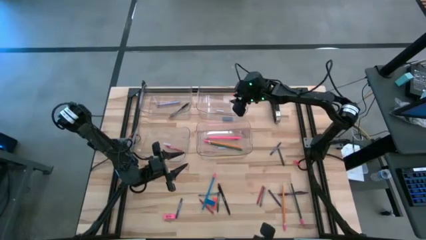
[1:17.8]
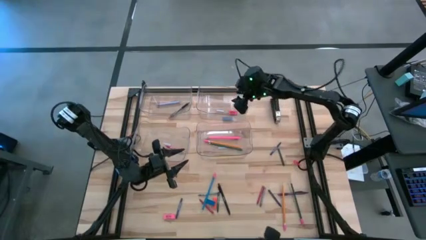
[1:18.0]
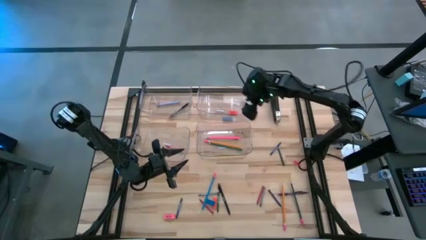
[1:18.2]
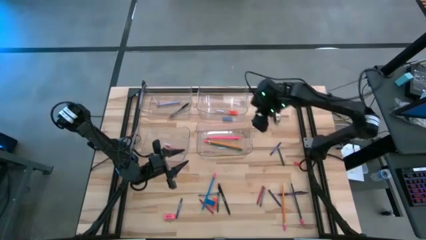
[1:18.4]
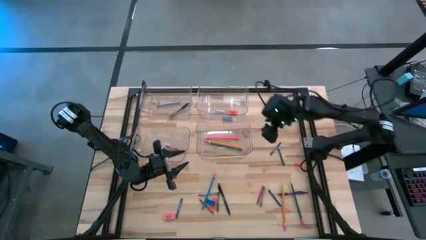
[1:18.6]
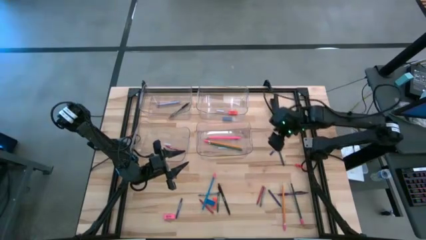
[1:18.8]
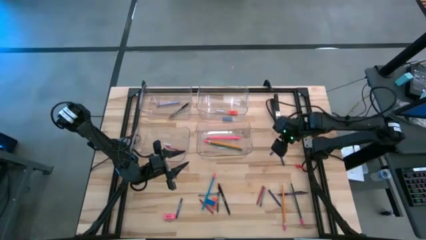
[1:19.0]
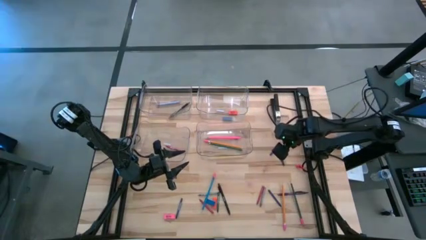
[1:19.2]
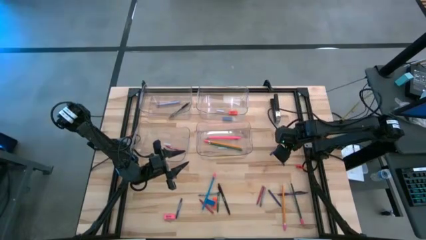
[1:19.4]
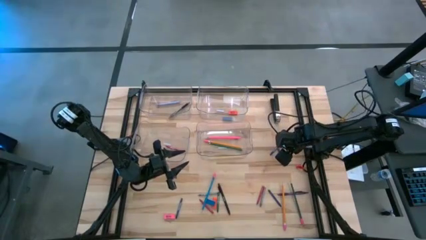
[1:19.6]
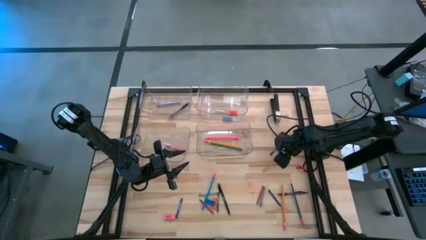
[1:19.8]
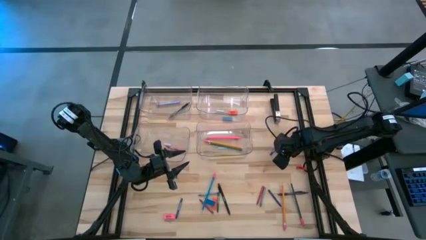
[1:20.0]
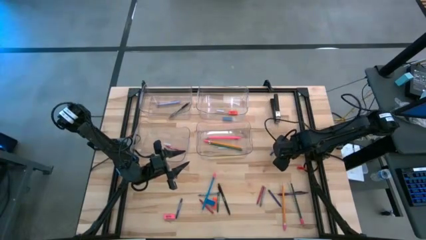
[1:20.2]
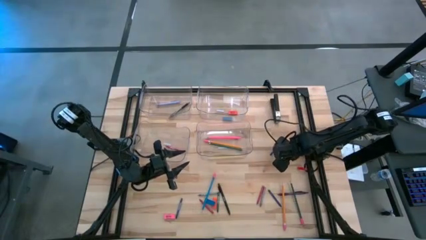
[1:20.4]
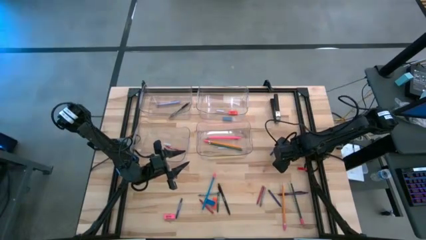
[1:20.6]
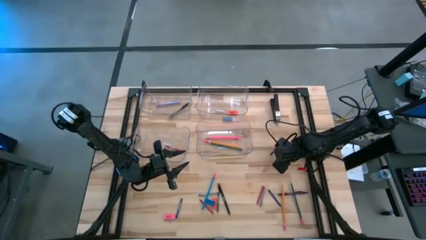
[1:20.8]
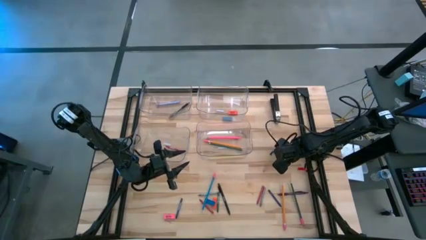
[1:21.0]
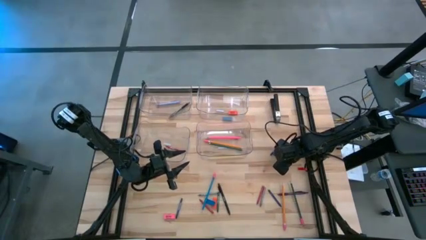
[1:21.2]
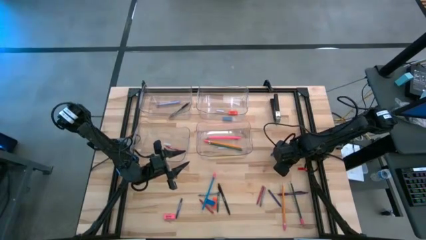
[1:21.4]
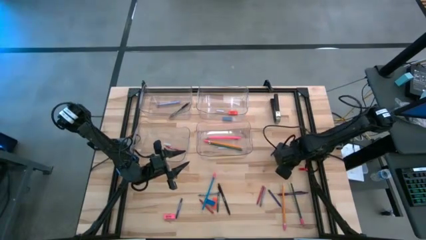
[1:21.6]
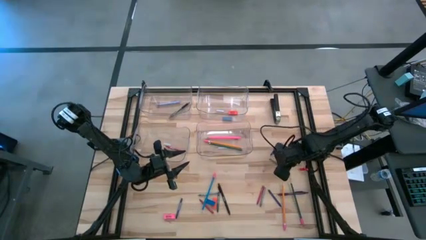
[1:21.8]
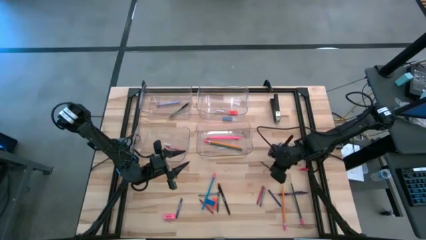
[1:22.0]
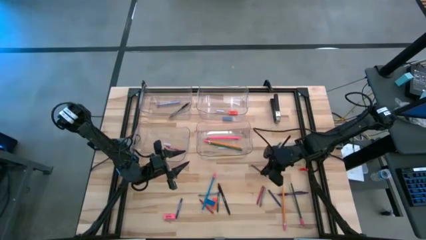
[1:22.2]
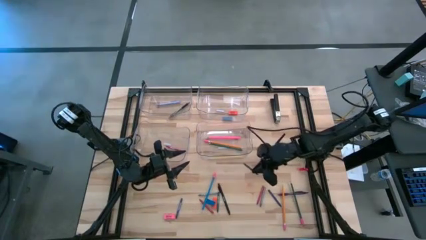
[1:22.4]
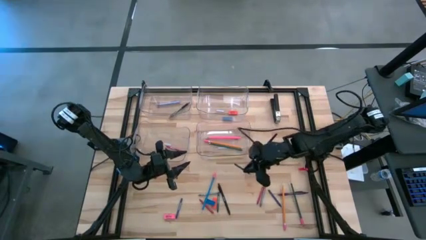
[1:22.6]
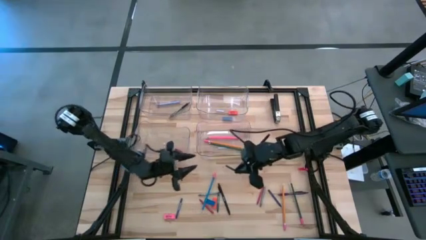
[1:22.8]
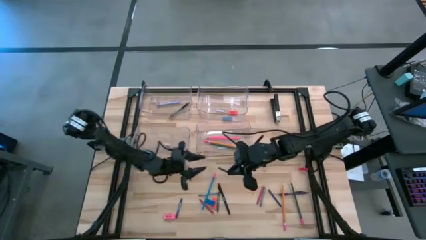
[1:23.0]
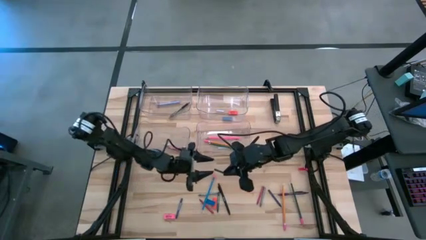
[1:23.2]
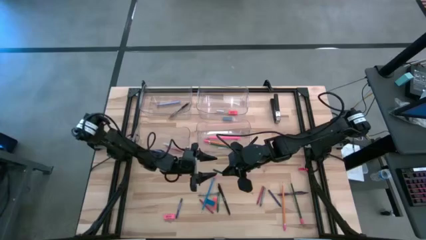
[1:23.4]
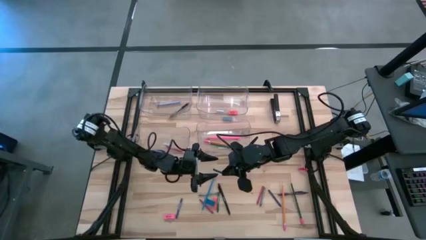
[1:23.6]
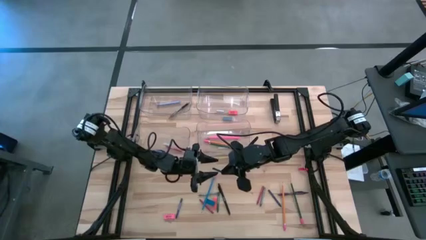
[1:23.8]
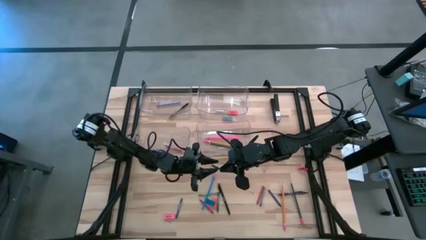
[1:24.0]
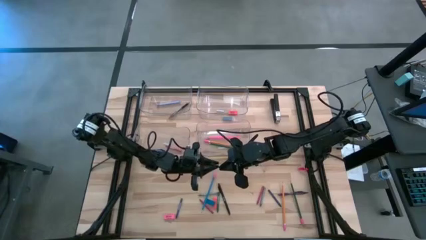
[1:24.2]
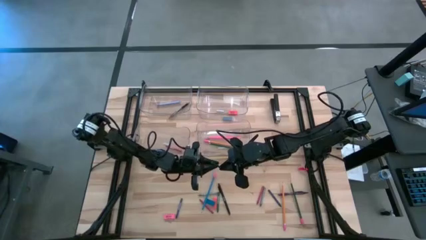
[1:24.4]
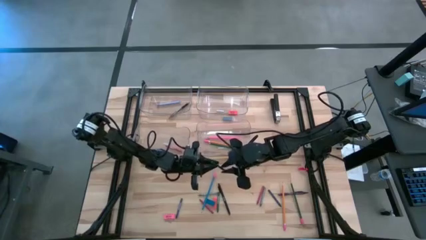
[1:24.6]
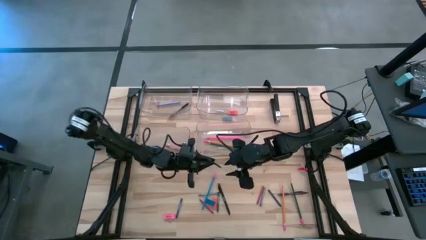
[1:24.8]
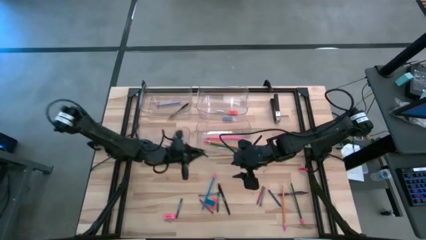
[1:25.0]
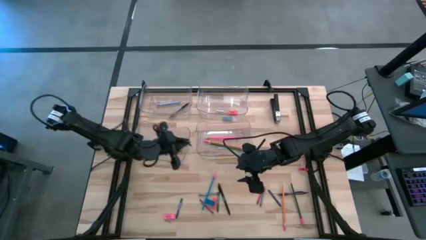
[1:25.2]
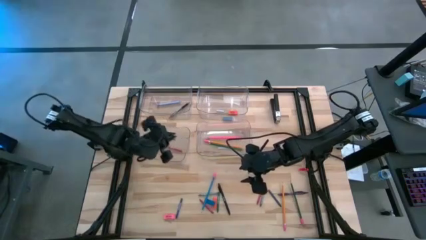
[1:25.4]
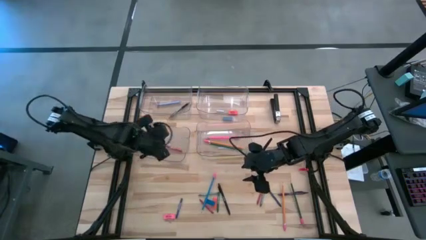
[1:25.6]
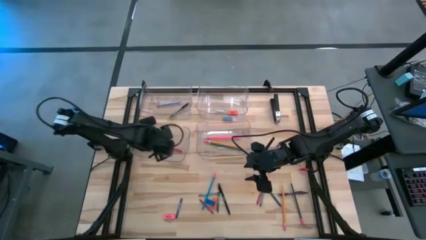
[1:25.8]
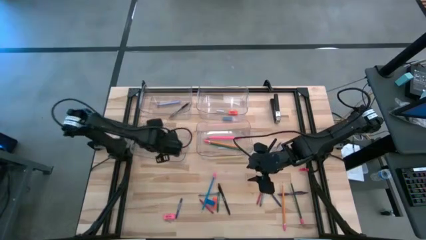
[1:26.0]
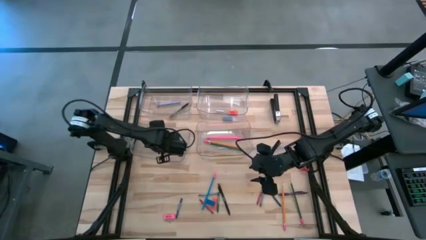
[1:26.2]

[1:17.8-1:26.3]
Task: Sort crayons/erasers/pens/pencils in bins
Put the top green crayon into the bottom left transparent bin

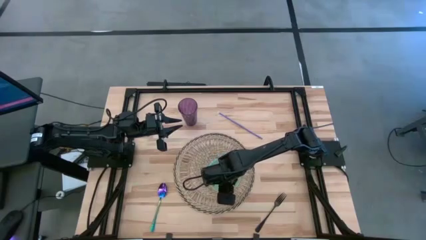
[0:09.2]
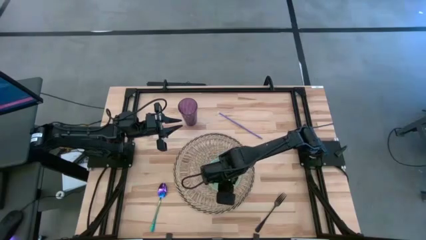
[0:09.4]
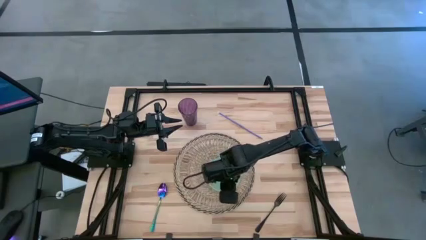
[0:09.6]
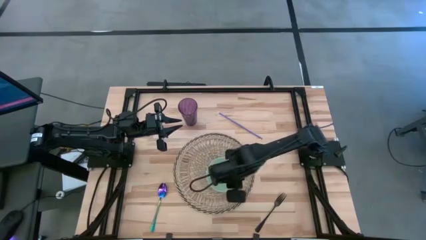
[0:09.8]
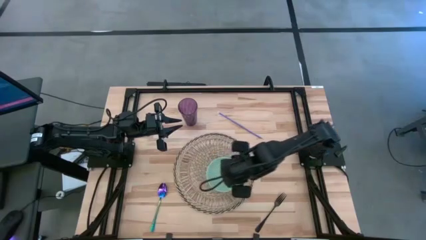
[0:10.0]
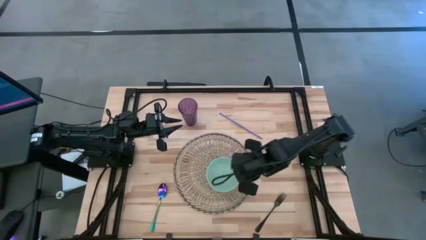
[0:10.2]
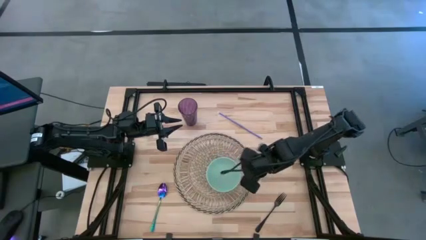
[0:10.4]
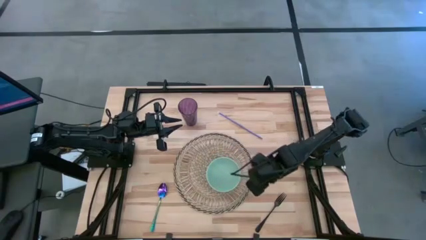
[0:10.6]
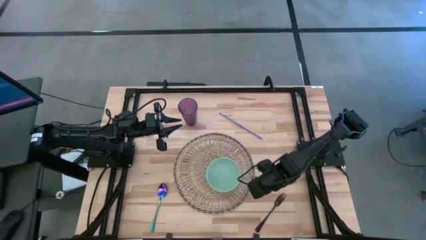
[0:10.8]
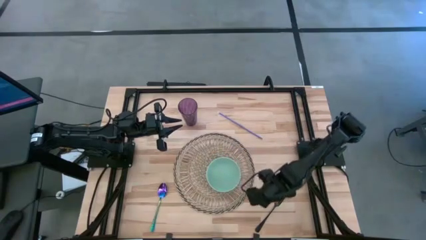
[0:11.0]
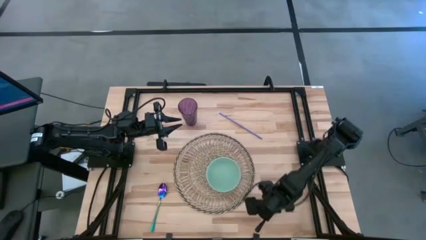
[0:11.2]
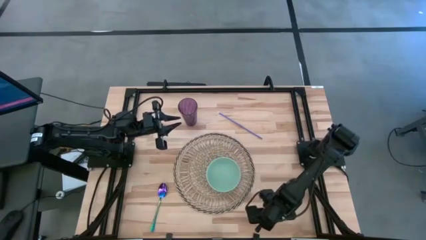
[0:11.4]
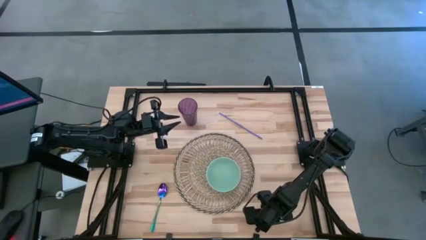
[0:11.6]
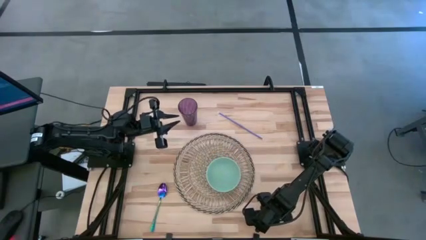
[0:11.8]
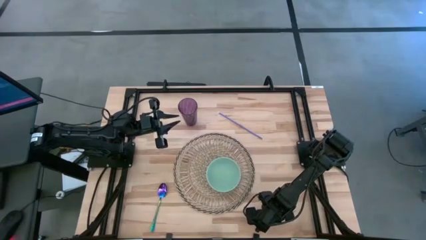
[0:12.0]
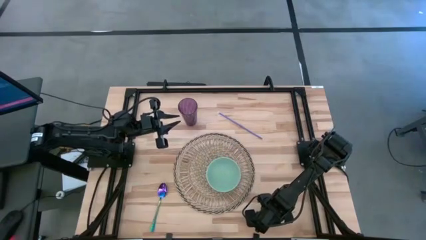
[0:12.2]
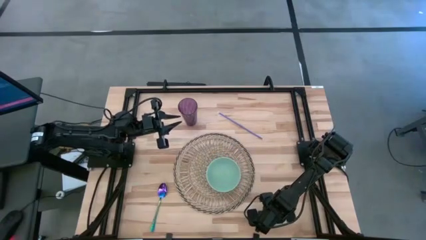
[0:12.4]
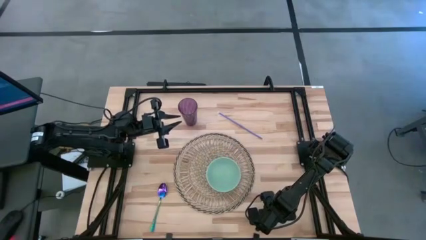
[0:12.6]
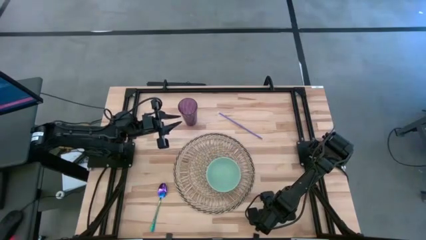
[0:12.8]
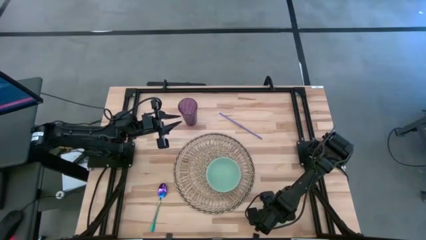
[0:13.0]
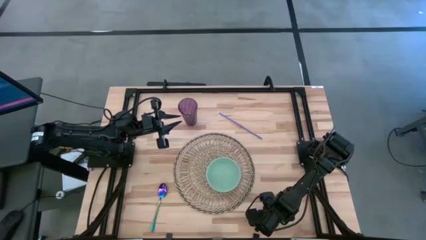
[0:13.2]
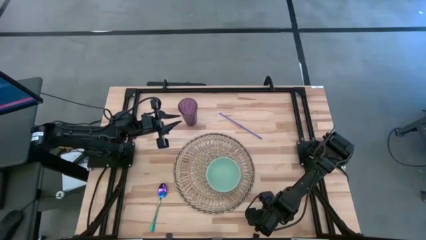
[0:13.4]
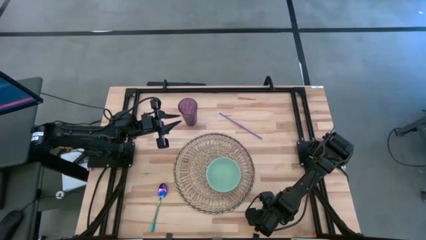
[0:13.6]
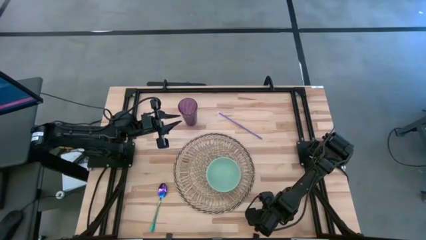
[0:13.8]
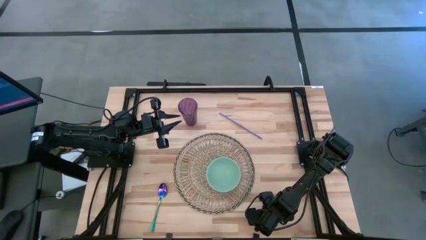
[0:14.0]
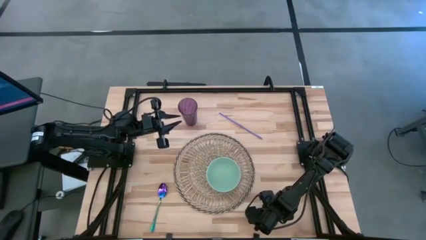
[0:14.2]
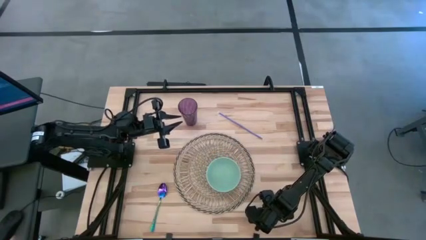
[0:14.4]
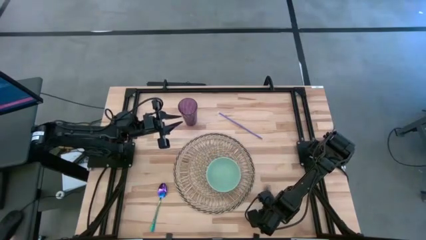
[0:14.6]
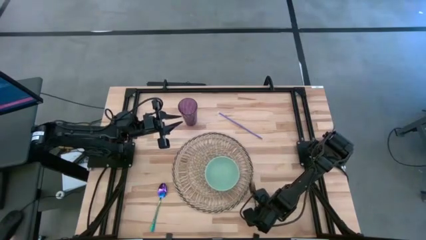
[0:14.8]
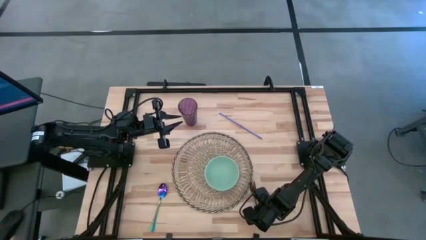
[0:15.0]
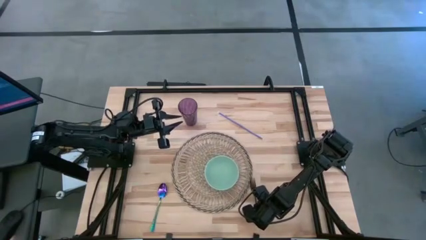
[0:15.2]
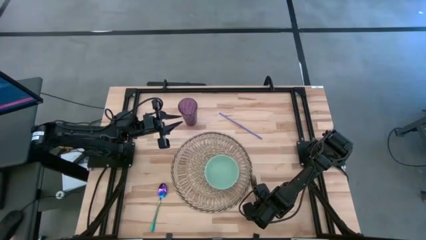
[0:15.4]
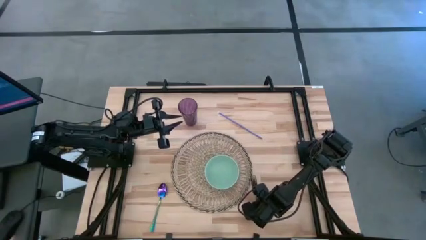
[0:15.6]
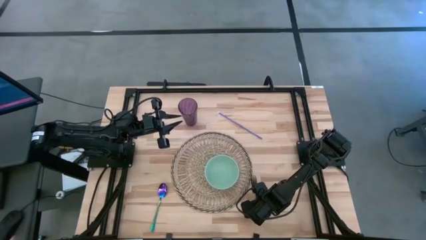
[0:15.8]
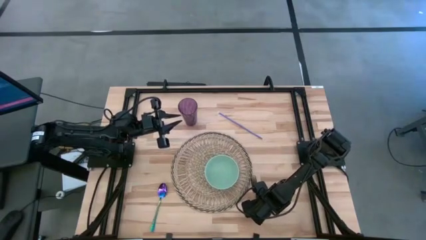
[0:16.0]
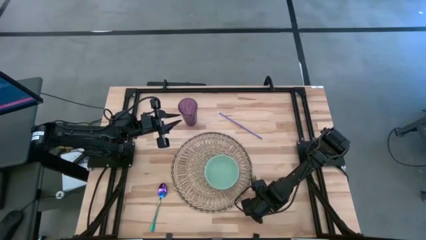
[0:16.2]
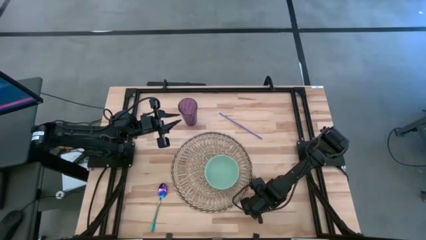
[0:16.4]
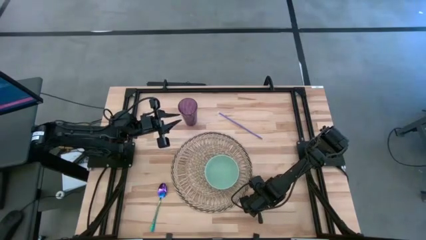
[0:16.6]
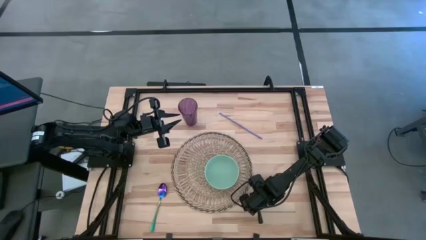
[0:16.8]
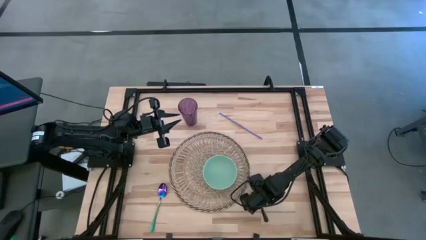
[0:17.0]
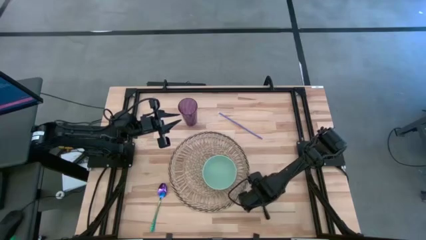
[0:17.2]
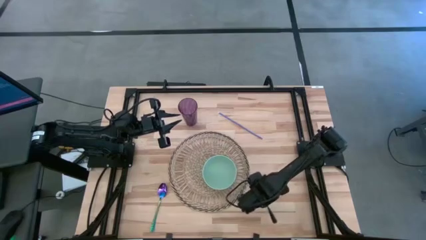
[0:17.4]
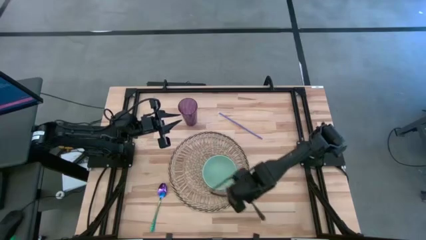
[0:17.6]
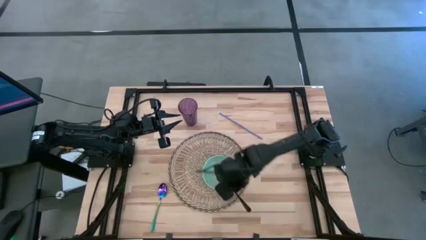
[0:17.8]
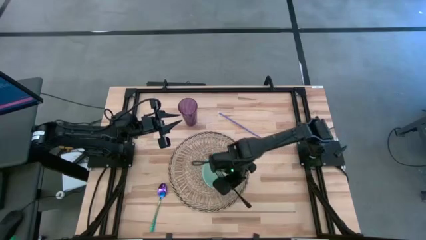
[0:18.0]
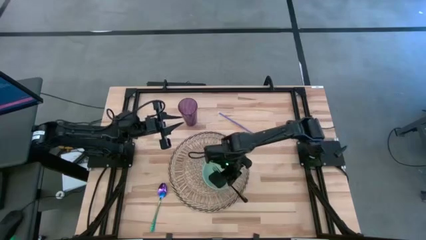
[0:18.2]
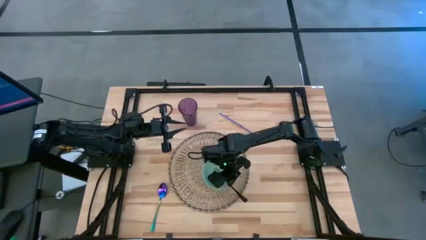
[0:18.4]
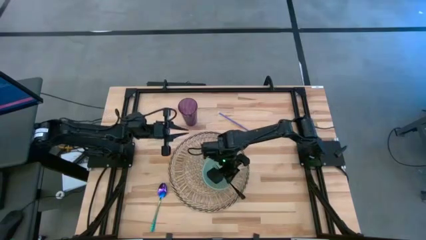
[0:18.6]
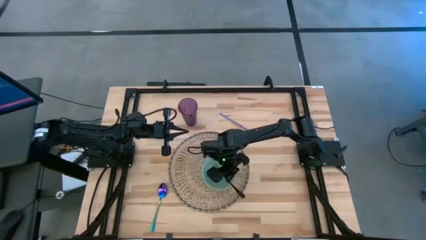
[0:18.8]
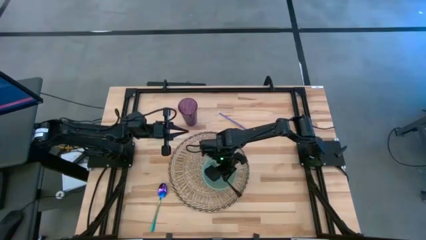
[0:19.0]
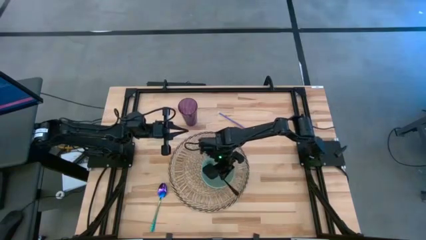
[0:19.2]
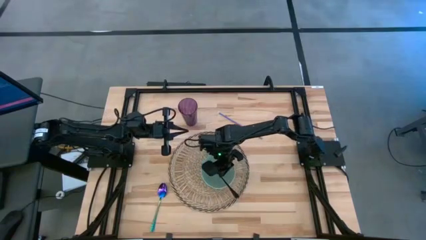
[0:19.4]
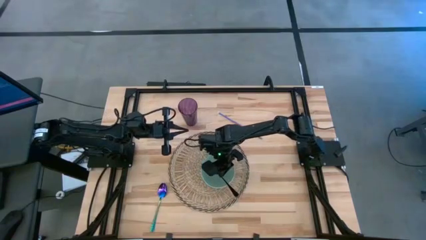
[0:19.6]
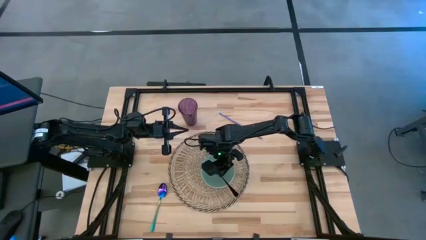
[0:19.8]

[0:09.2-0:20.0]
Task: Pick & Place Utensil
Put the black fork into the light blue bowl on the table placemat
